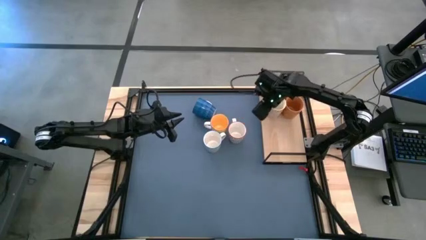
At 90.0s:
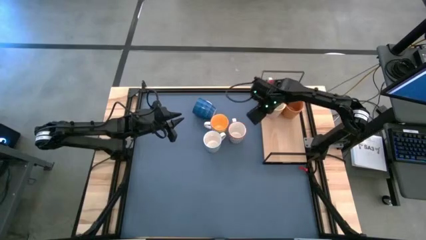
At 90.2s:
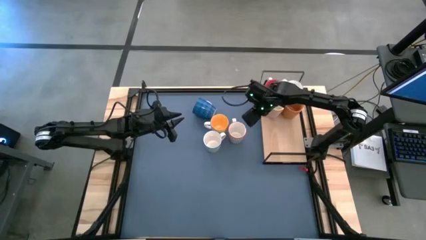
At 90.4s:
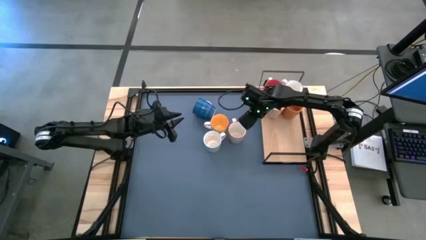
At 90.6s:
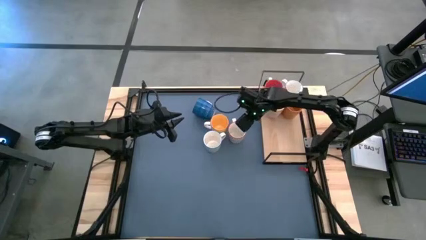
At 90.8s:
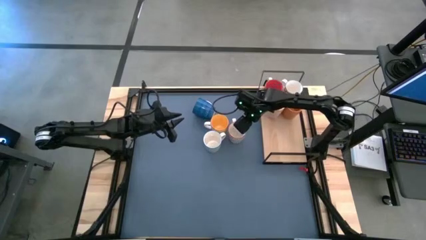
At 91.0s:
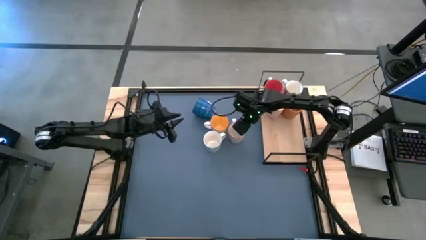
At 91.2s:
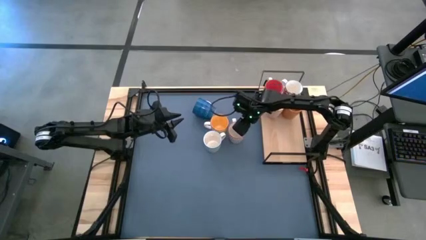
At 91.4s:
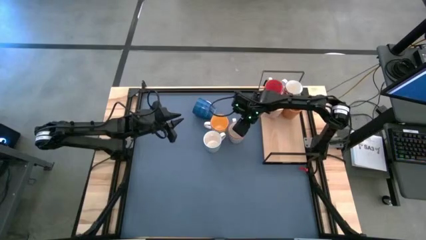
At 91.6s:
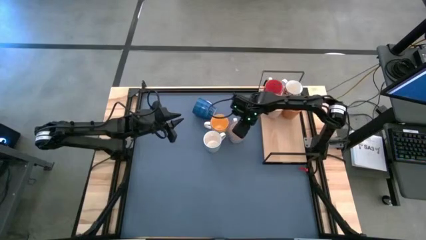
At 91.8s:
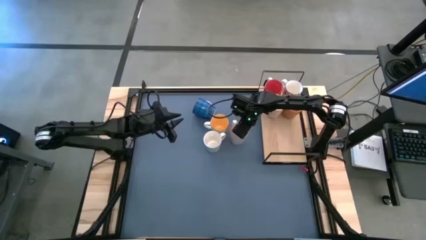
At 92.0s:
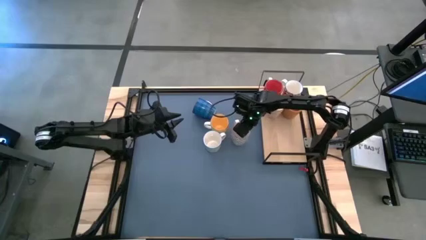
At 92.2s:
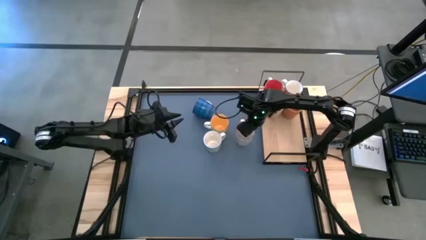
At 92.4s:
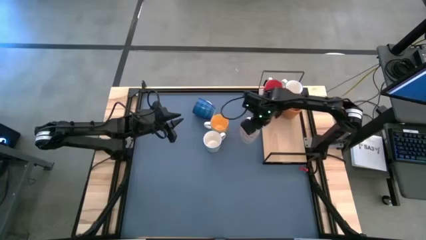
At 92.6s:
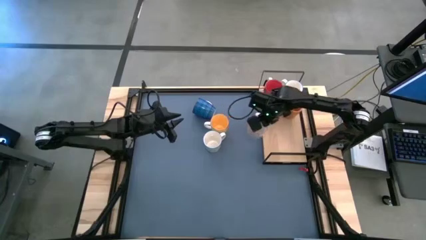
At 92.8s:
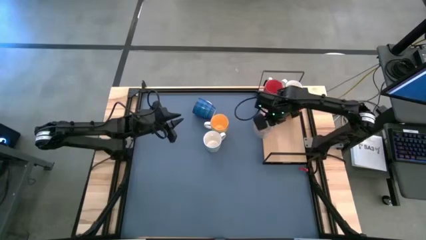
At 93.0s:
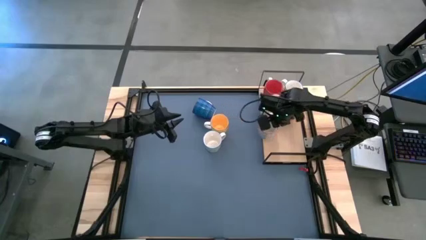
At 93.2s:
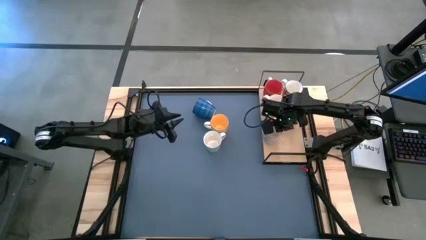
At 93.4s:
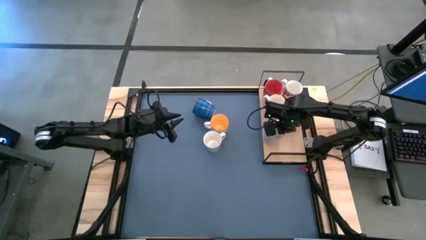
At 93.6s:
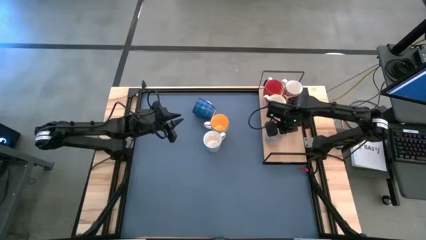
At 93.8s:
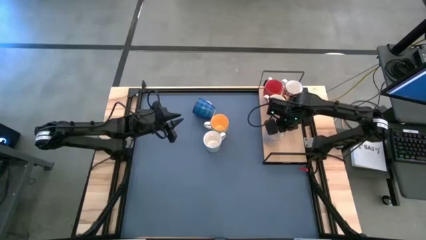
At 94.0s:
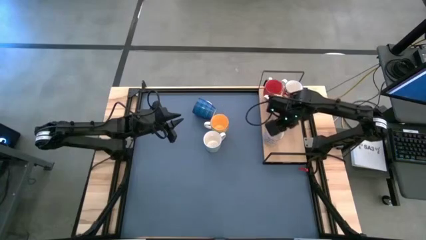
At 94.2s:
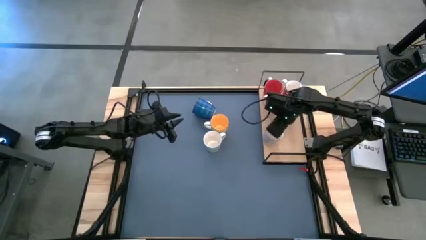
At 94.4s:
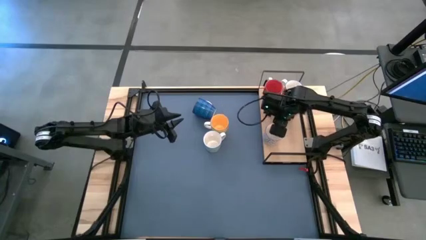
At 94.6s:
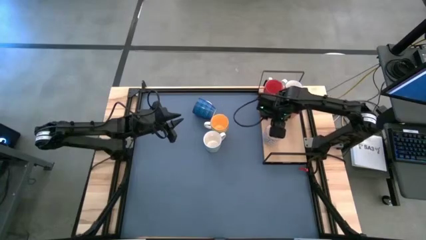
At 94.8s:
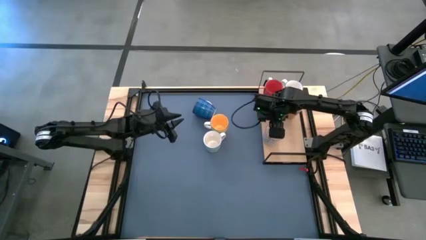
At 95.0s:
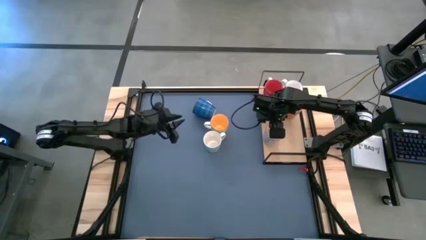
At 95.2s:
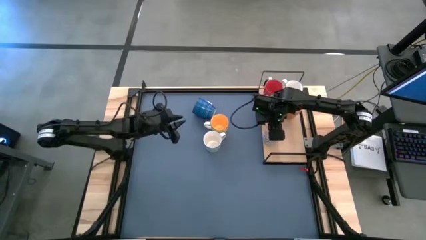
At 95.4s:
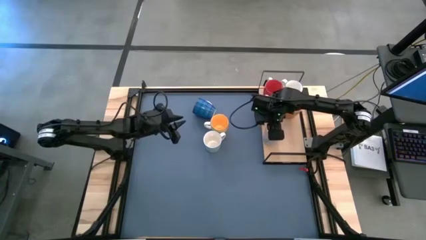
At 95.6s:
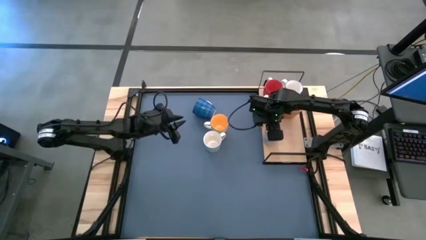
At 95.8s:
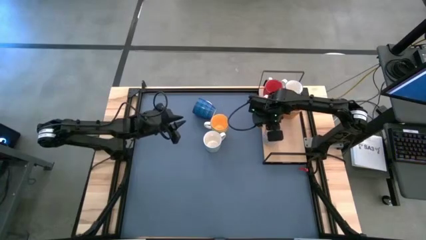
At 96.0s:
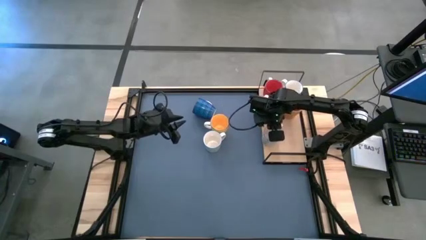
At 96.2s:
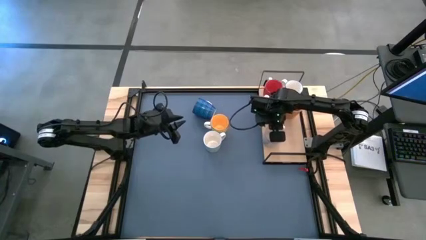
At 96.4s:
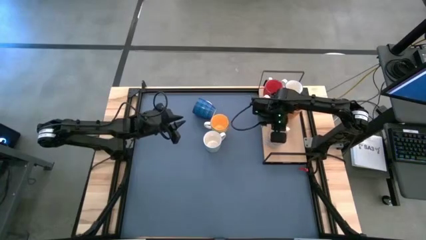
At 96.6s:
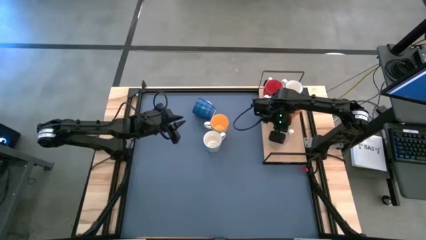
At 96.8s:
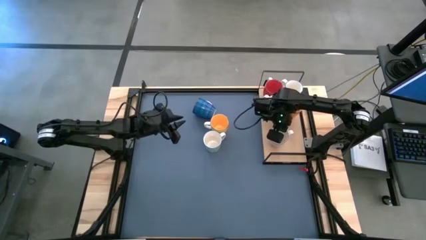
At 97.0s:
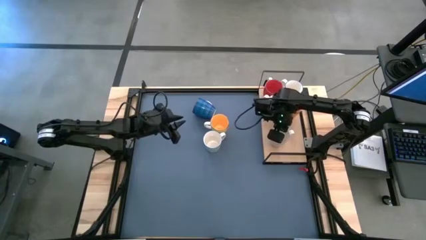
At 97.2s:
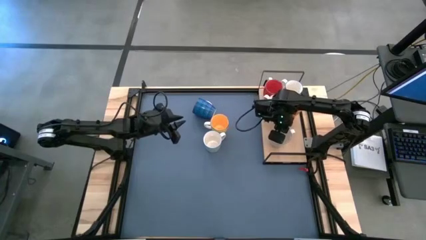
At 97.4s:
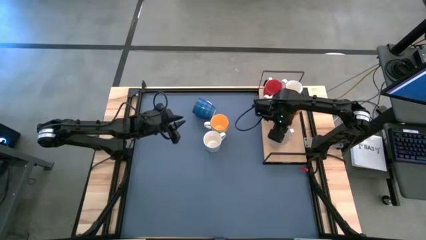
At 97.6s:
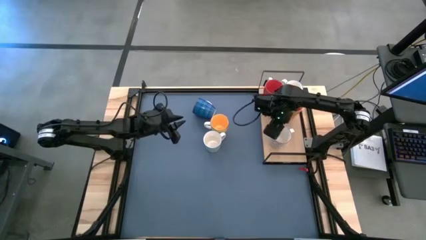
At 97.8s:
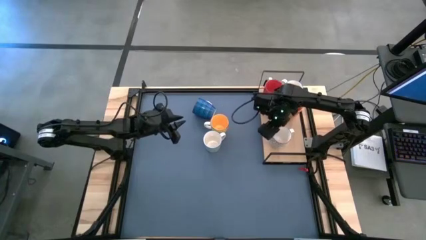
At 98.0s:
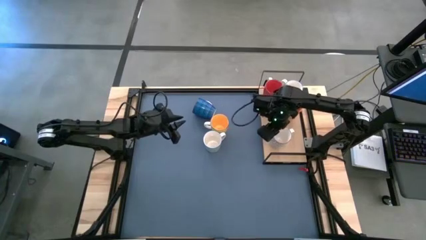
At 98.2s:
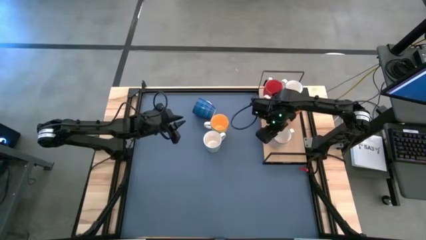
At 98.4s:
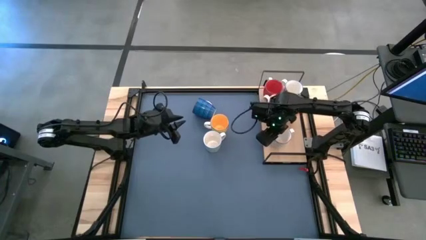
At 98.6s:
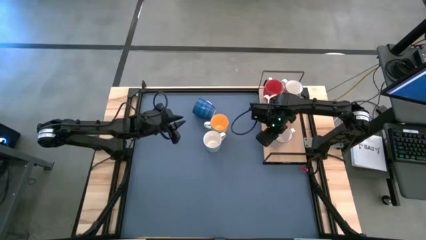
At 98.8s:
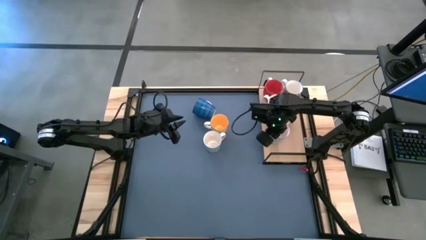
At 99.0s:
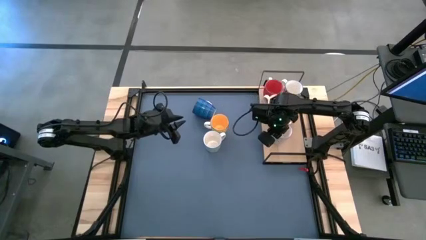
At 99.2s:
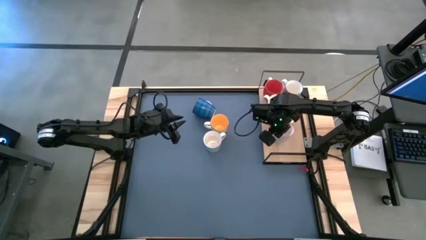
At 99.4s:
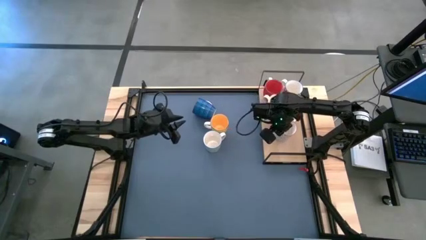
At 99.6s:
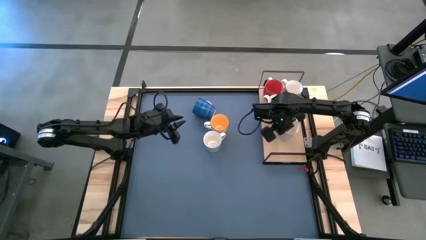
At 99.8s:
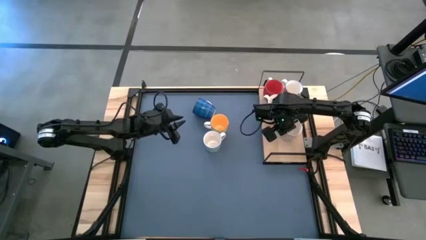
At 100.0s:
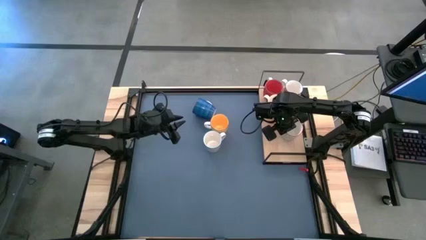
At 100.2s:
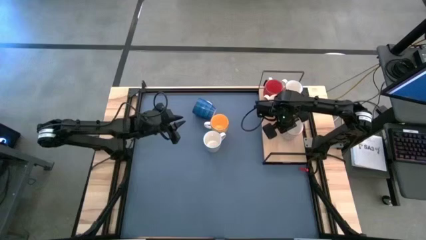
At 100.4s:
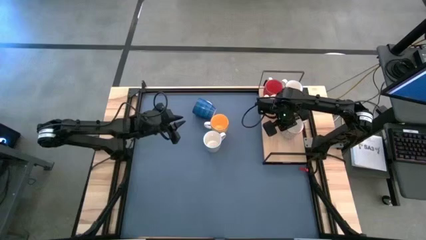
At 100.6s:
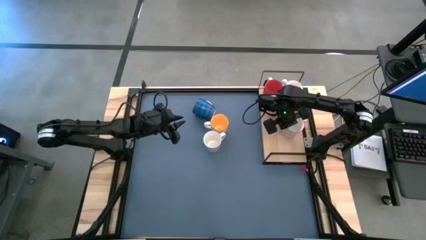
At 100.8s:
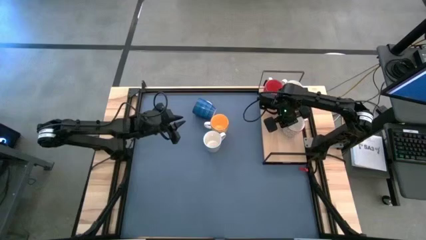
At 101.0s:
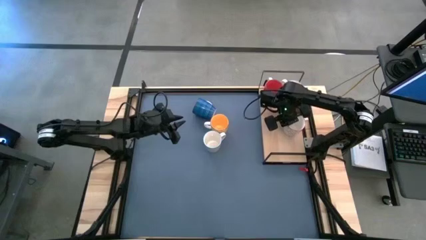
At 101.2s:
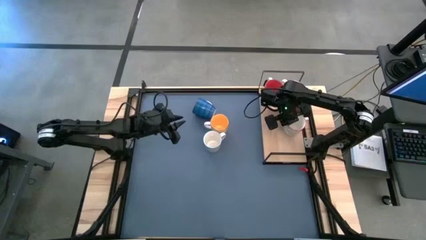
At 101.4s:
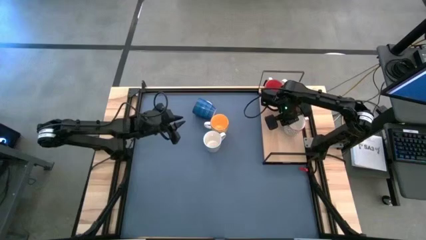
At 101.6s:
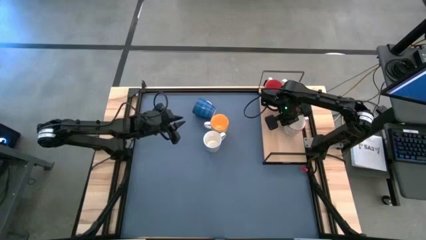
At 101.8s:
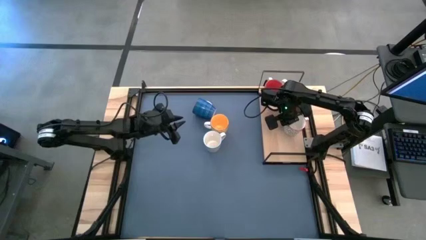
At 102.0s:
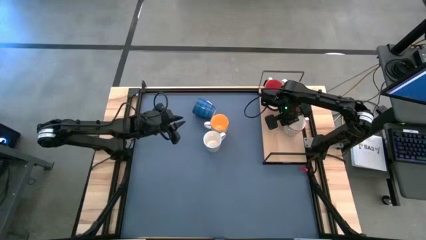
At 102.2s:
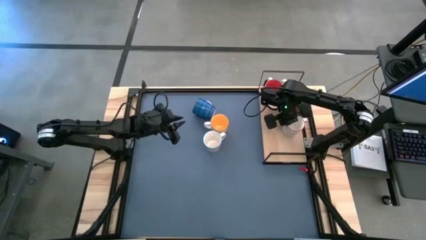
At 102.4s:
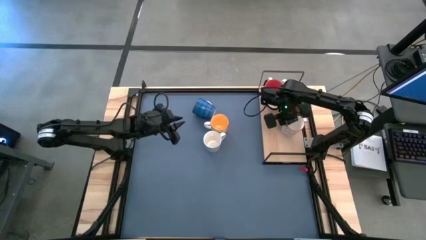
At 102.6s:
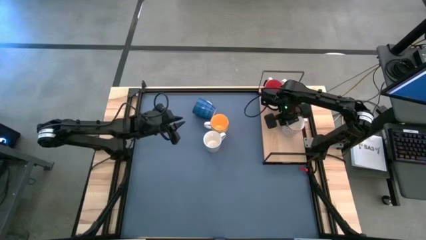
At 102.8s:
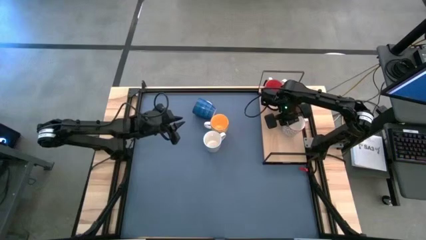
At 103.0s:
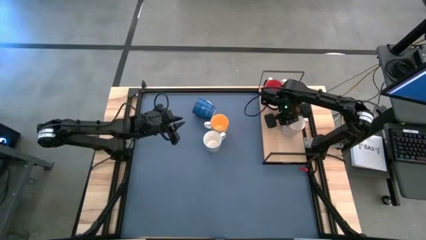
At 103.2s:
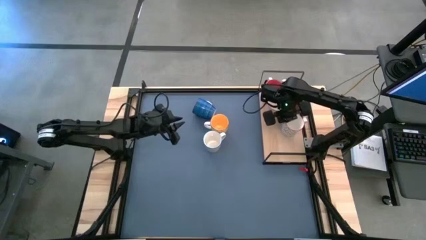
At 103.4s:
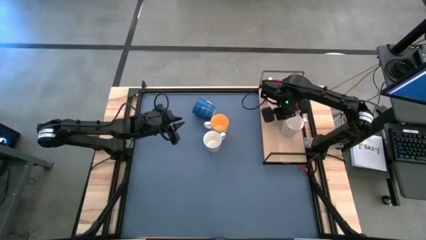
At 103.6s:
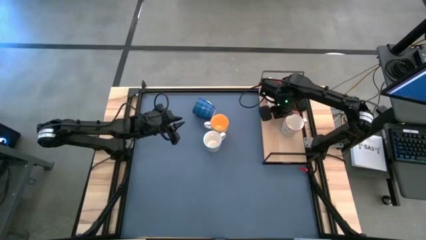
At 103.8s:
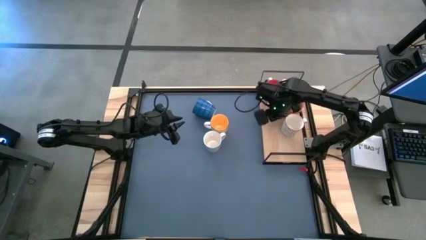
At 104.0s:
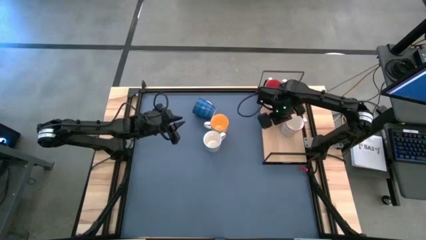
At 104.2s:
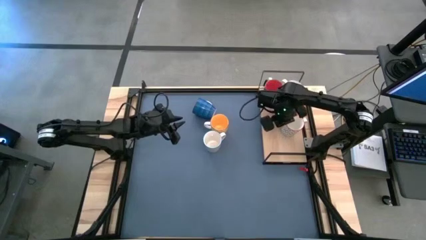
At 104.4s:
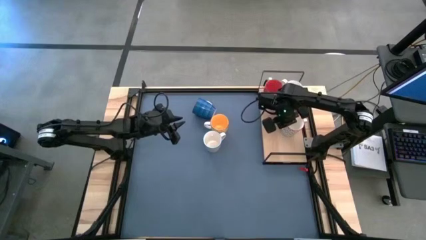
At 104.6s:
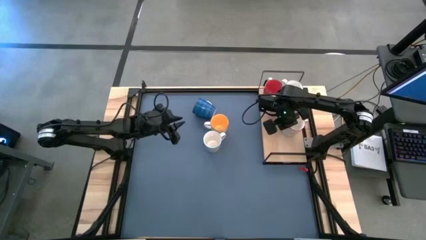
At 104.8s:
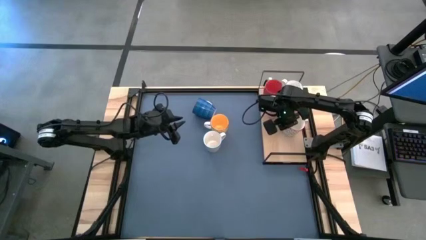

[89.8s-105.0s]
Task: Place coffee mugs
Put the right gray patterned mug on the shelf

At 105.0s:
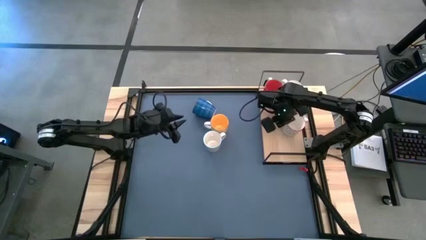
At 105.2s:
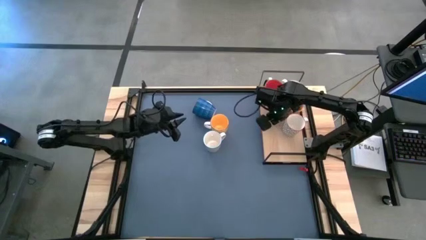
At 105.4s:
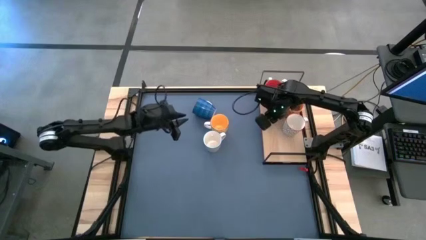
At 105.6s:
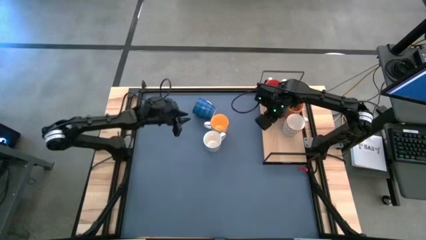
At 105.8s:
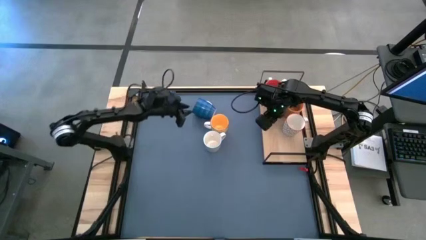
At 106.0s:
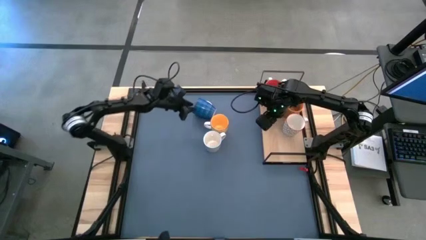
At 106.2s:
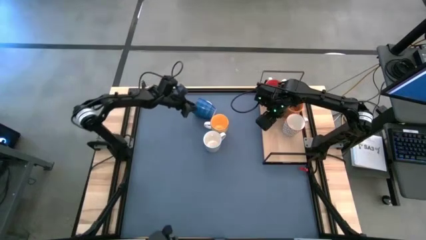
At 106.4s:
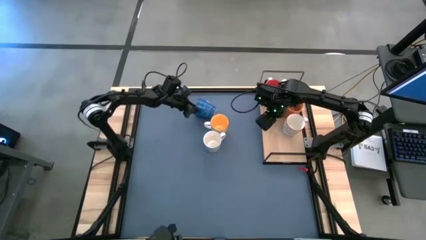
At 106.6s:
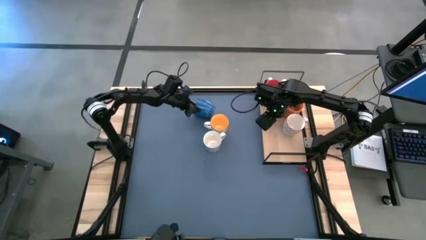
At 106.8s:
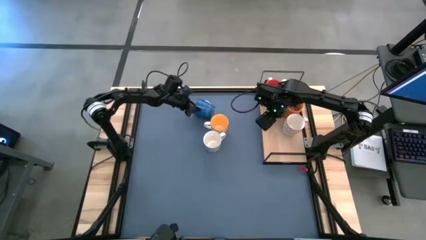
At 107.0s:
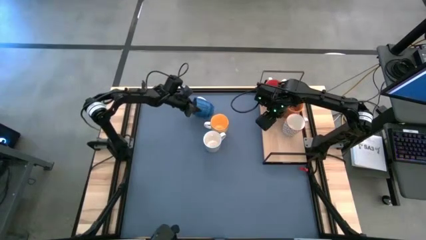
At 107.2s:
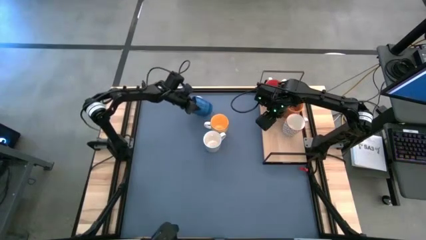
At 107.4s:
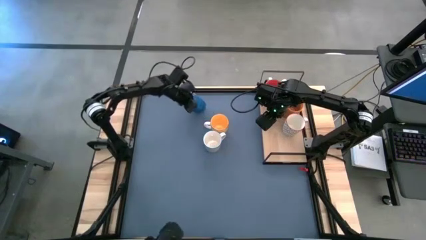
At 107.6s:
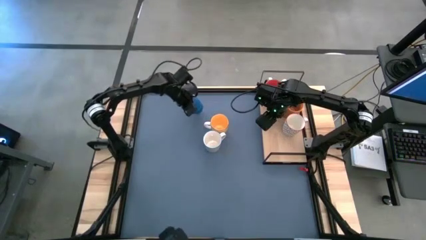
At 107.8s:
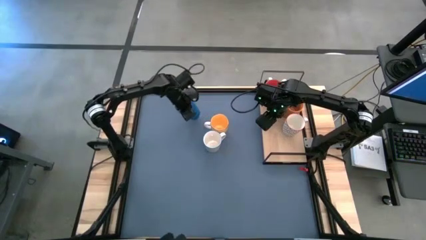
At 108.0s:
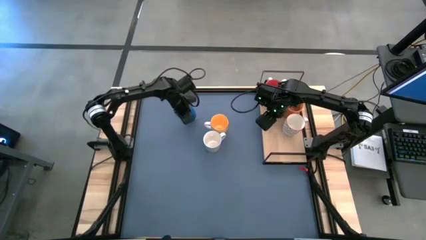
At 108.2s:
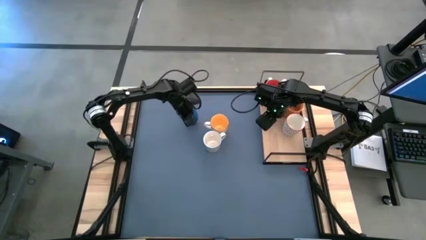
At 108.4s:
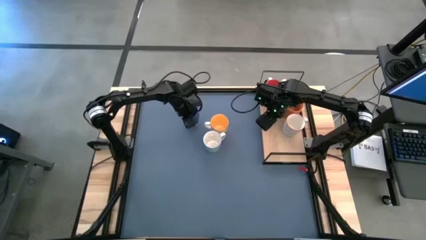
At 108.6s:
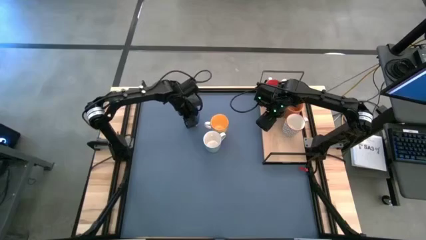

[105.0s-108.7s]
Adjust the blue mug
